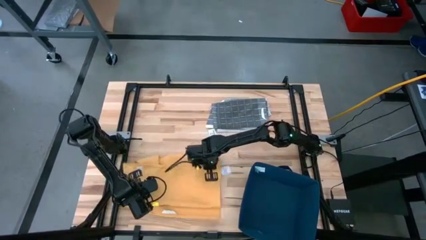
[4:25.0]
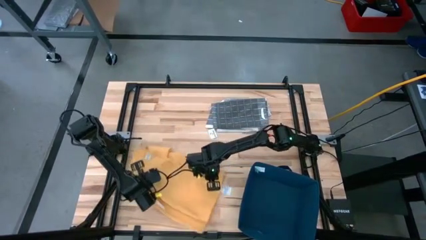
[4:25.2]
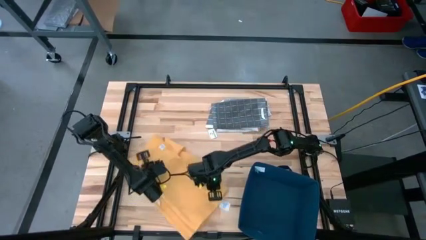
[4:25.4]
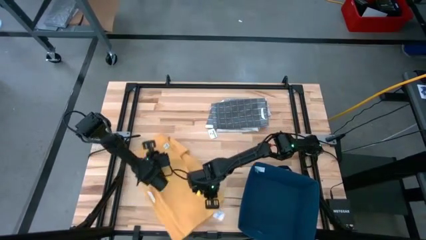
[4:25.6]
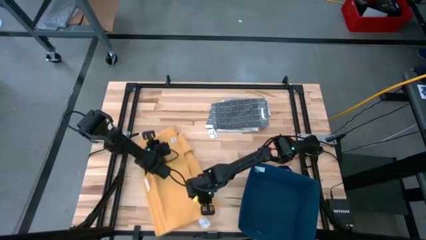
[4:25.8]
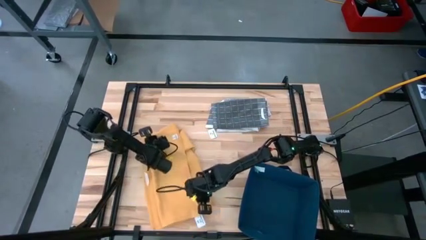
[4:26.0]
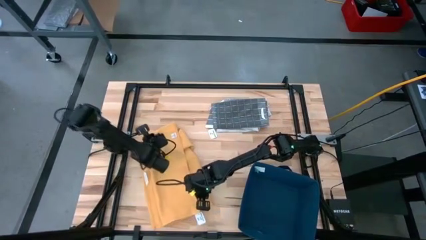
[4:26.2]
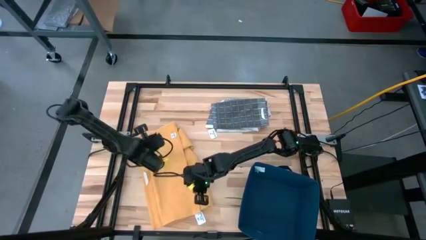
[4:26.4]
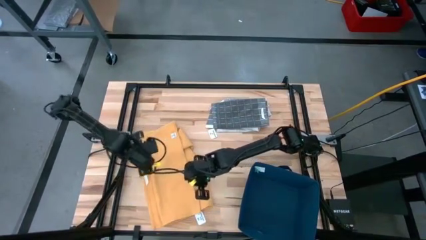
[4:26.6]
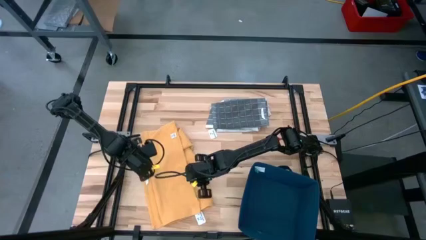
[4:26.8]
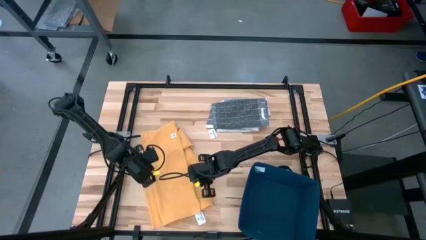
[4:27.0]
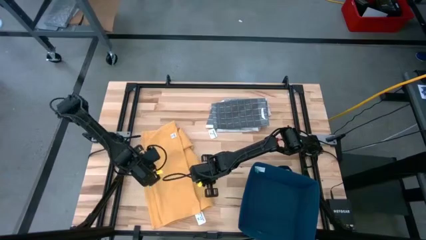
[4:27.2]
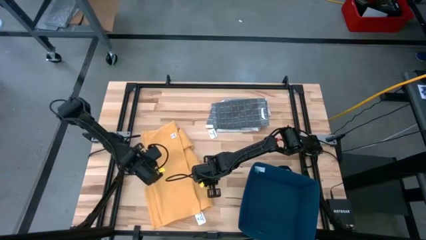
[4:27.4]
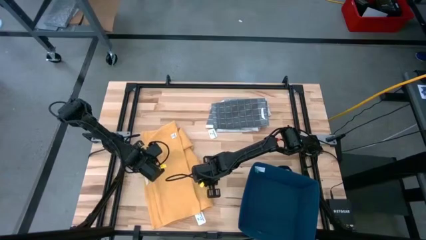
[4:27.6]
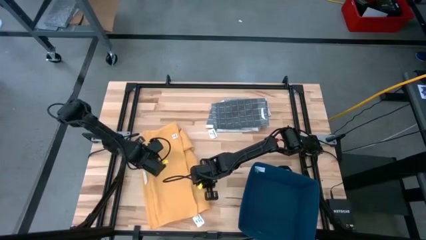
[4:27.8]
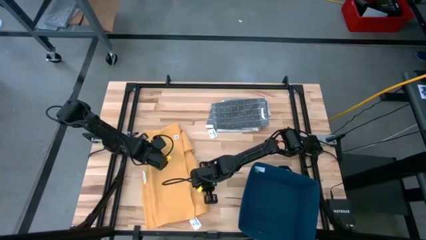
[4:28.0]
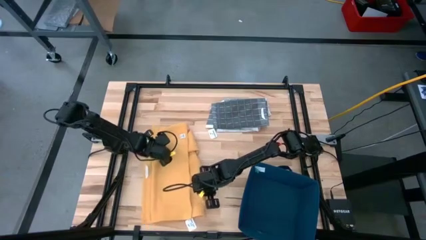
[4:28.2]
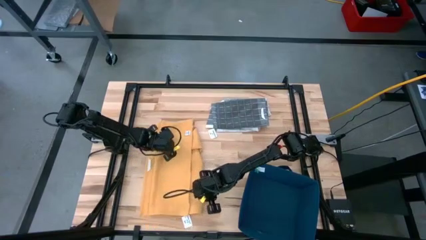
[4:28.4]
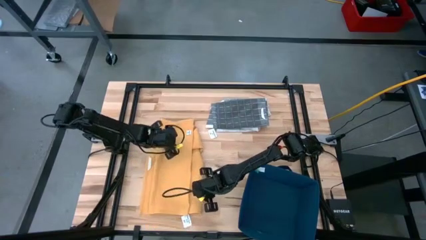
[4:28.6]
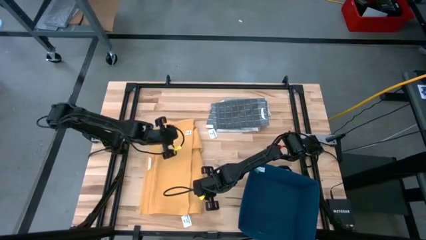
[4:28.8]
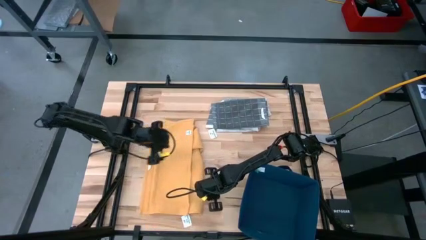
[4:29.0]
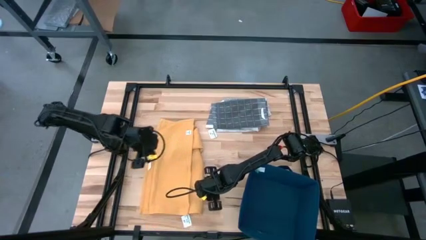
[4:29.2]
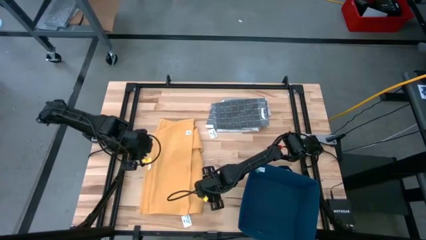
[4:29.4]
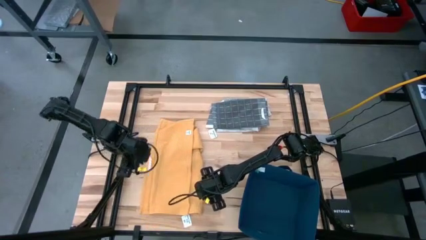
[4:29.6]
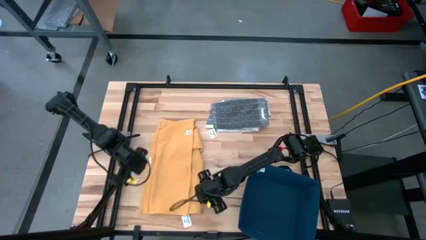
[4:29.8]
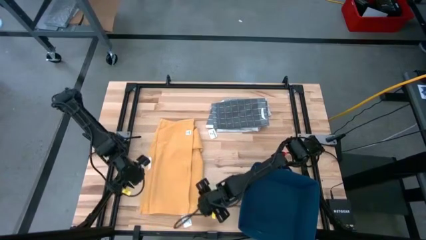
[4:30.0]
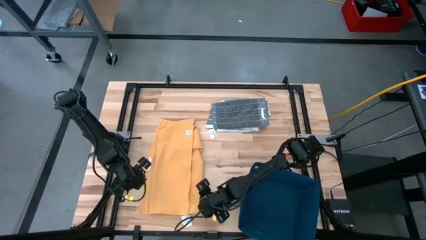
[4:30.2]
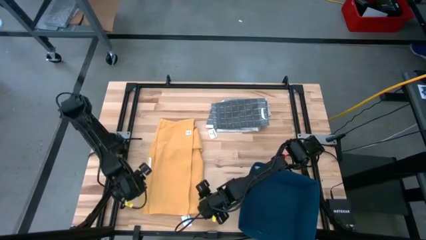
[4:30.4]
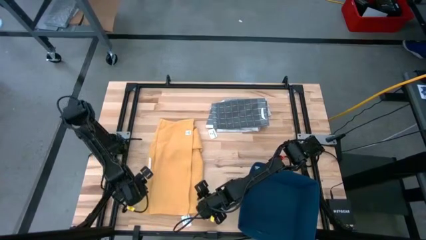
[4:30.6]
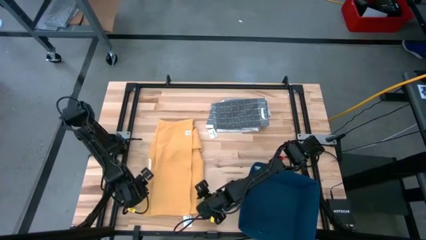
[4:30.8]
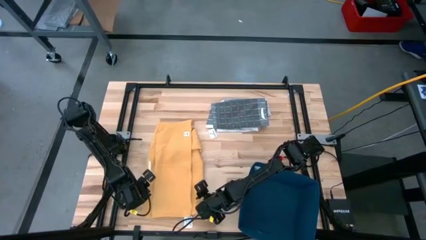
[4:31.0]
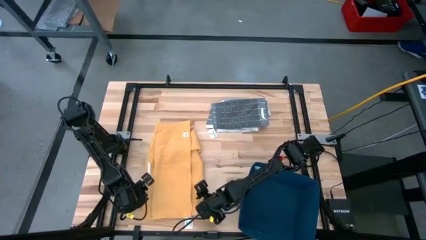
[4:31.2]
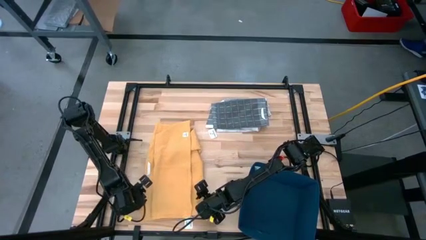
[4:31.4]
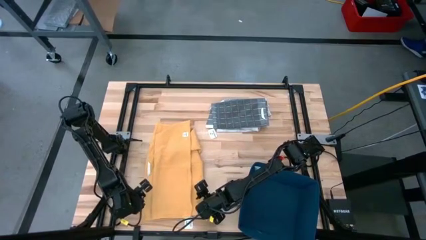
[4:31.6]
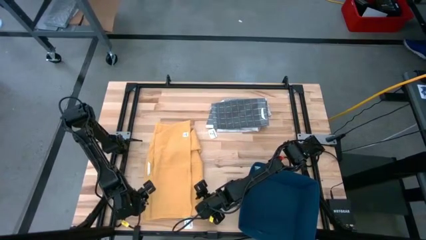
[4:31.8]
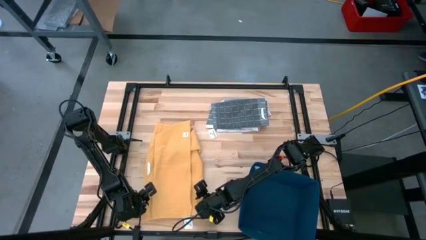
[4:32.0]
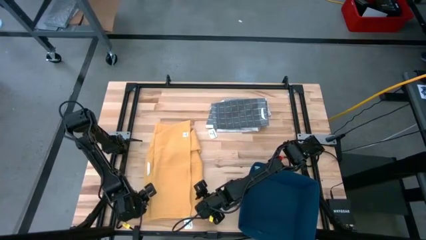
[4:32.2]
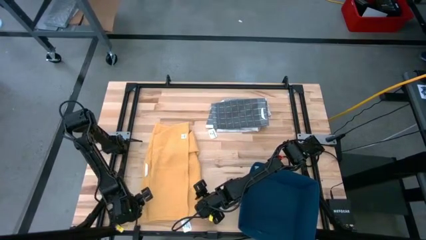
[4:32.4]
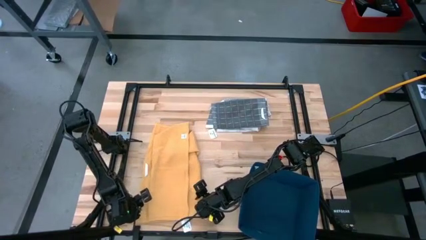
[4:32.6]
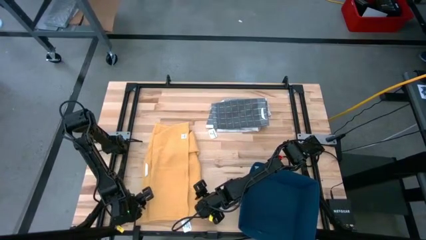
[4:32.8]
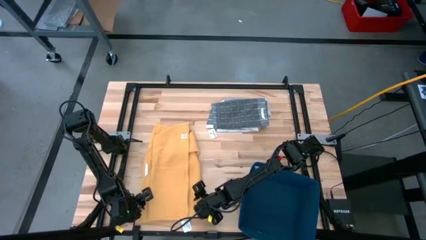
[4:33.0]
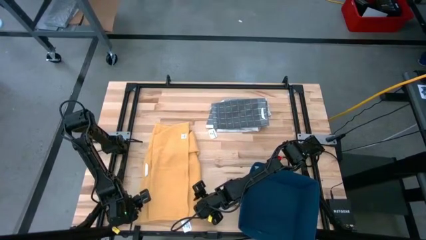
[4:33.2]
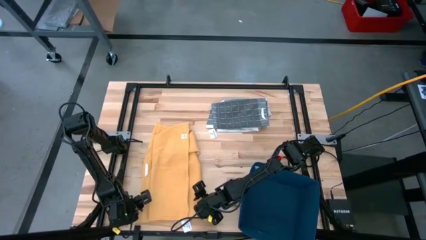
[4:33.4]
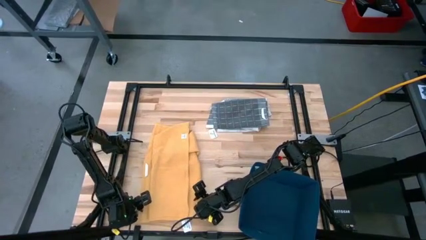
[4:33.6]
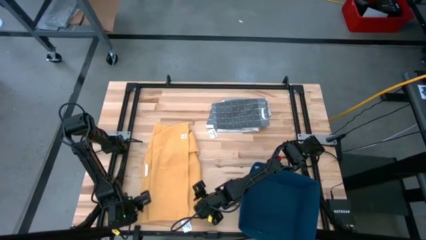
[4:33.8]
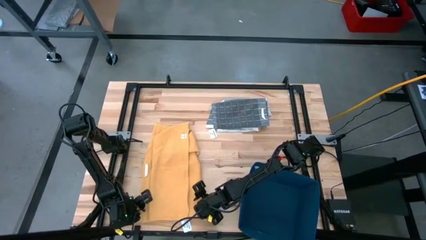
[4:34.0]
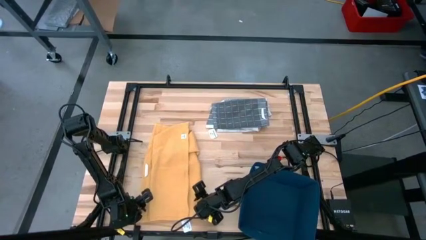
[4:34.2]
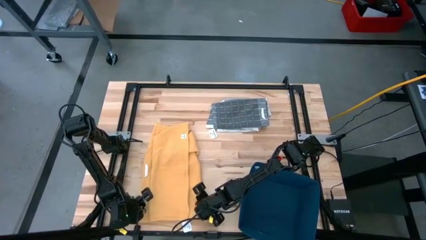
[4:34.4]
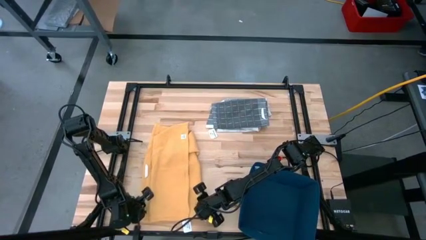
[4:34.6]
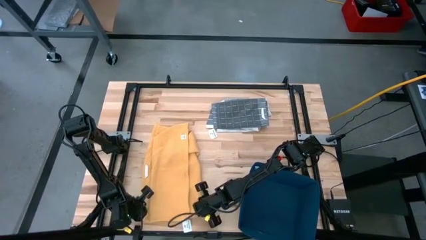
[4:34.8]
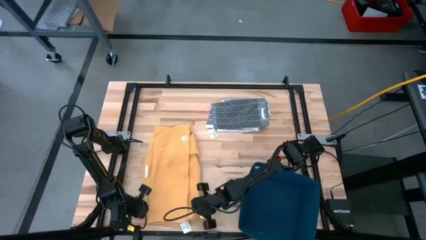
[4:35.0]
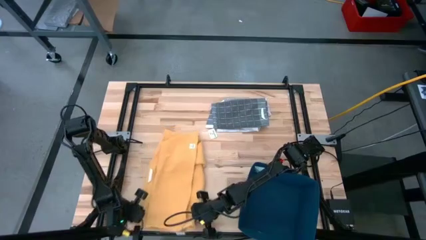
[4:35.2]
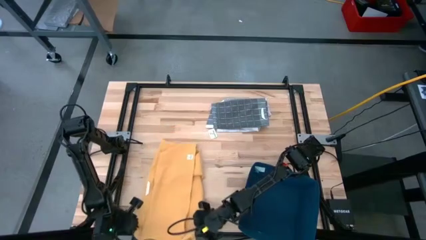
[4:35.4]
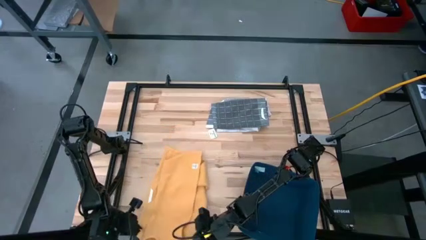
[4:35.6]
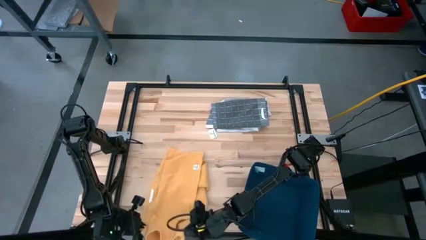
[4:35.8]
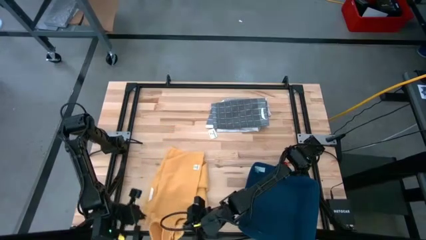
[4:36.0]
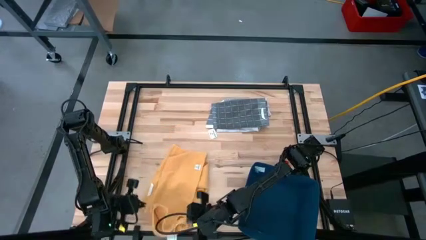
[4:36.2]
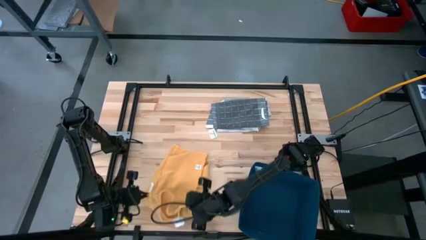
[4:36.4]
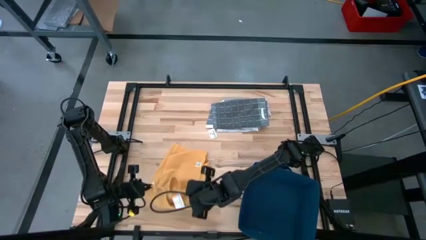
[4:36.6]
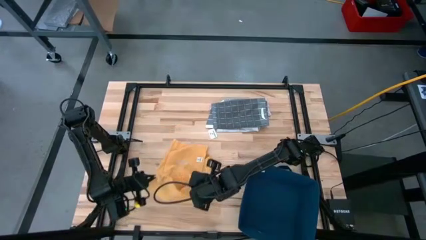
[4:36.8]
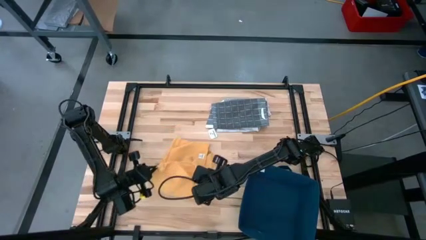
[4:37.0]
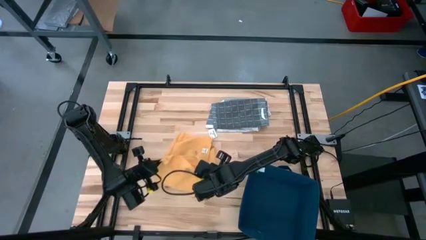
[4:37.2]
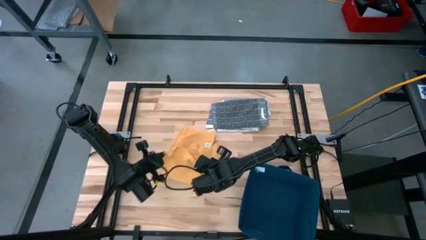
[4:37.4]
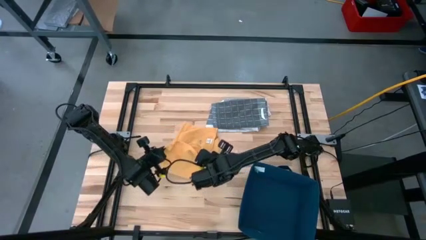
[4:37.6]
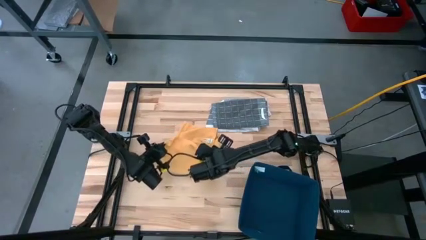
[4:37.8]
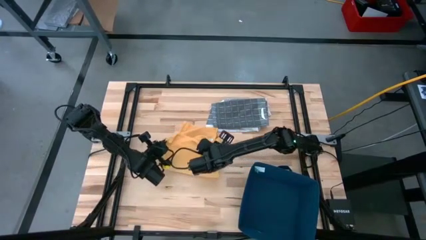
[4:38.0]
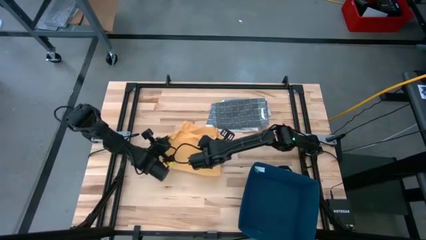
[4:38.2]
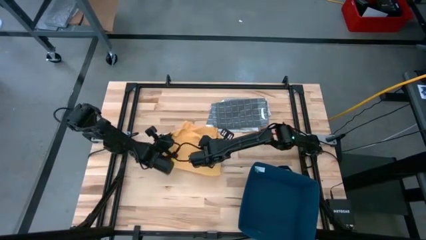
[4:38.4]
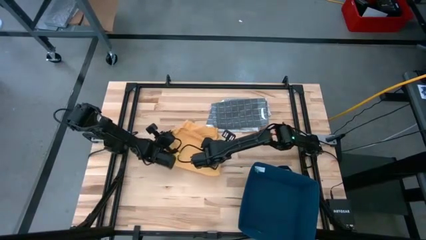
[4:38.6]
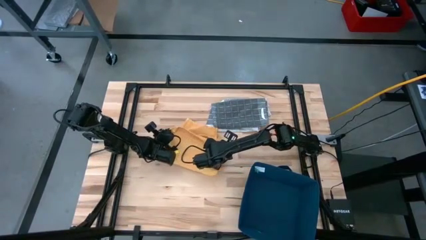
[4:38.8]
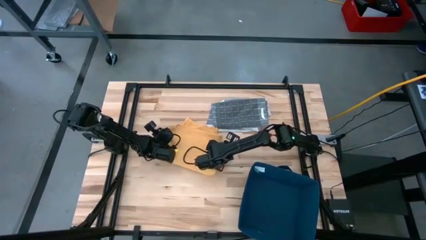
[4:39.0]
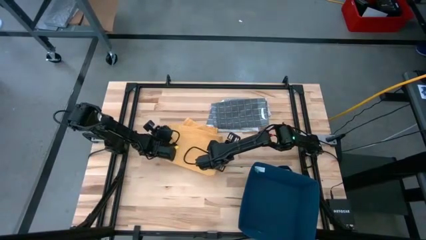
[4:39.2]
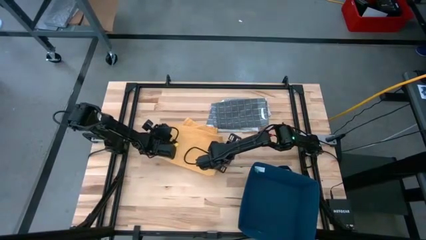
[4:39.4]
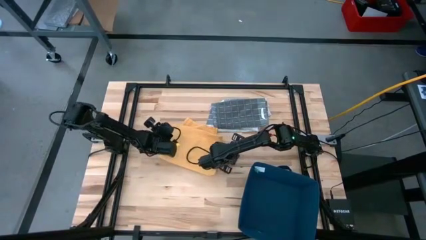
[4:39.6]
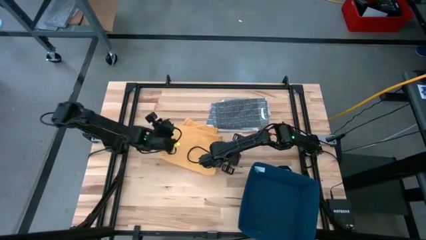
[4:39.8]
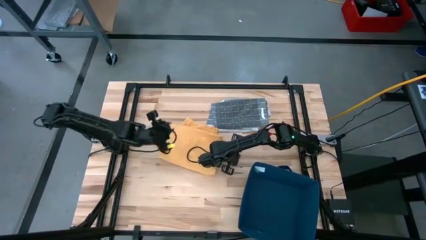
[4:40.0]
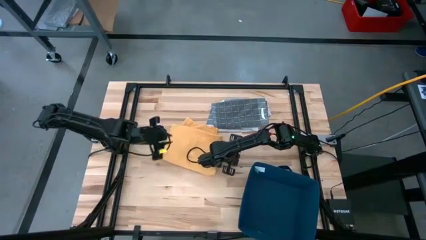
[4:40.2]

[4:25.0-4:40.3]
Task: Fold towel
Fold the yellow kitchen towel
